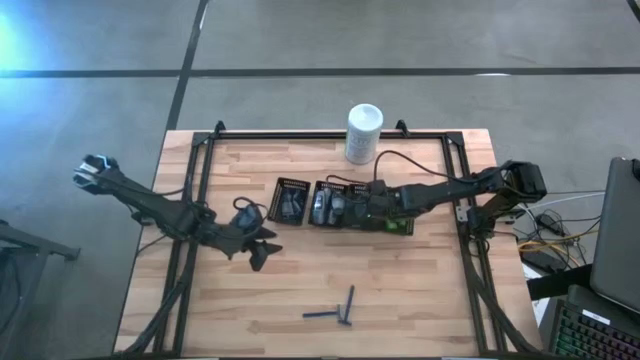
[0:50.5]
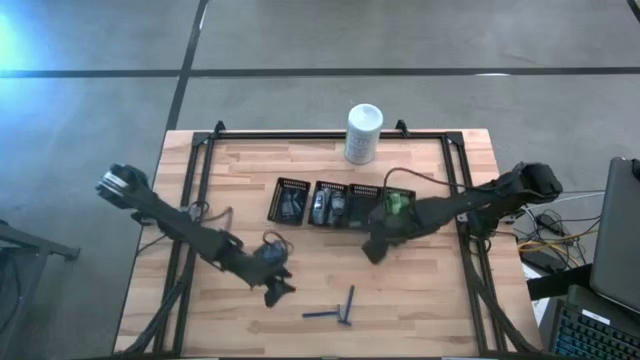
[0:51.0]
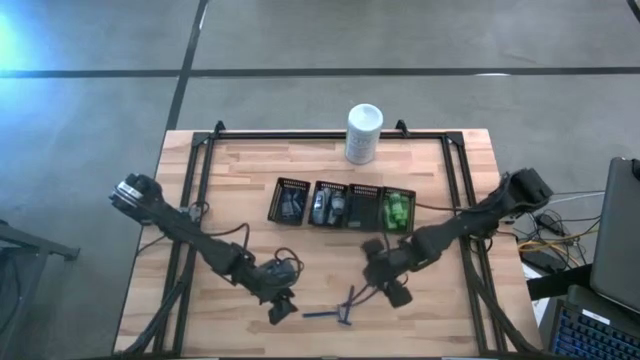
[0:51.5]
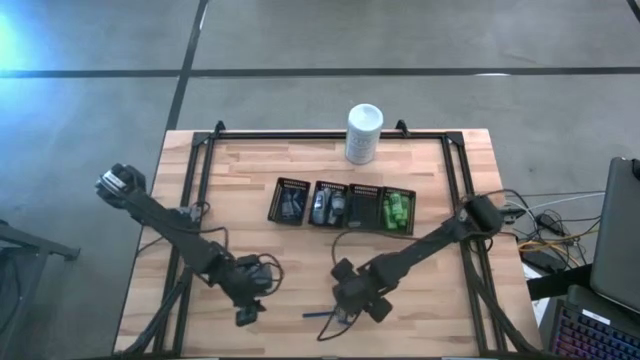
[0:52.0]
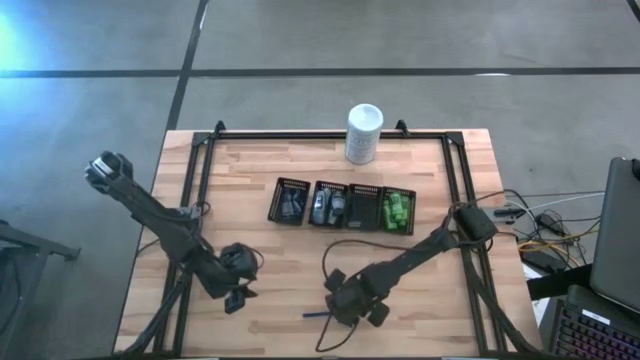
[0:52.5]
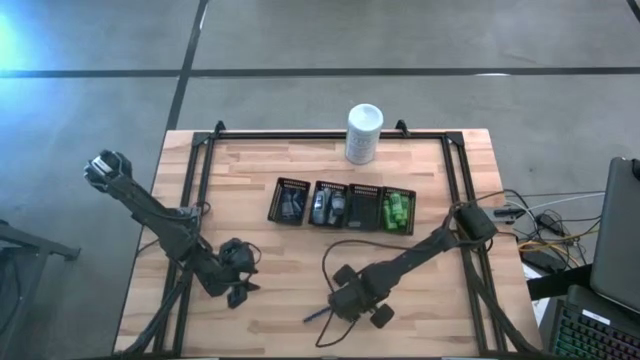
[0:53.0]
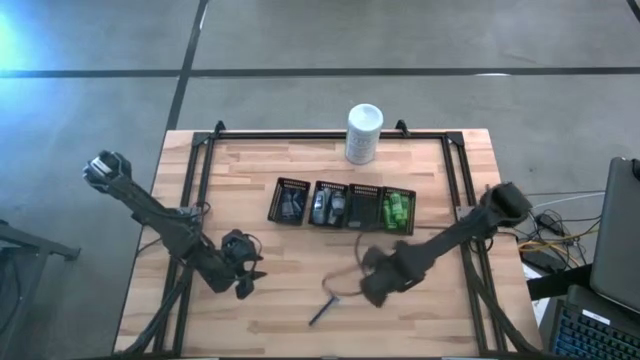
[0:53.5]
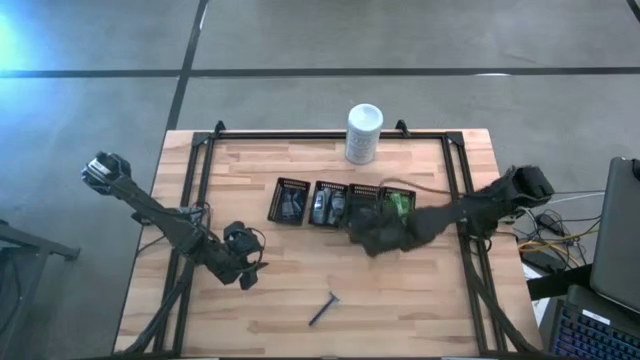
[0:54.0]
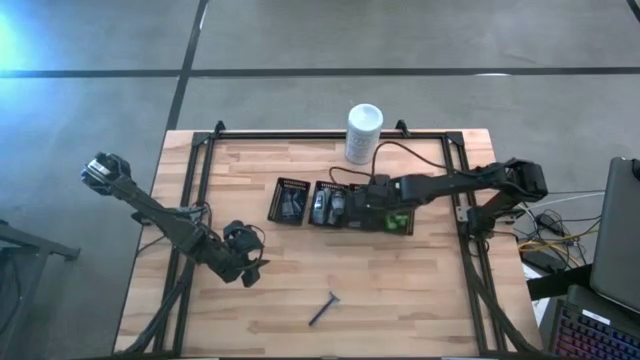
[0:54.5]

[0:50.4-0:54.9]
Task: Pick & Place Travel size toiletries
Put the blue razor into the middle right black bin

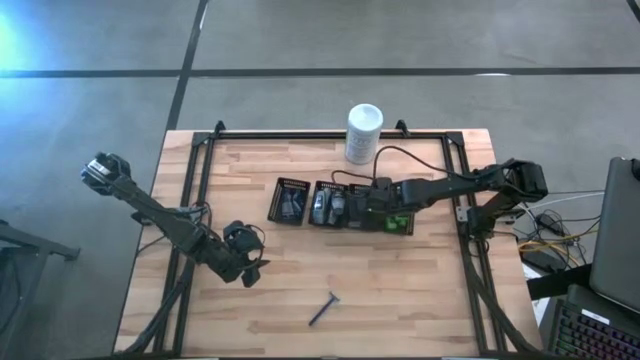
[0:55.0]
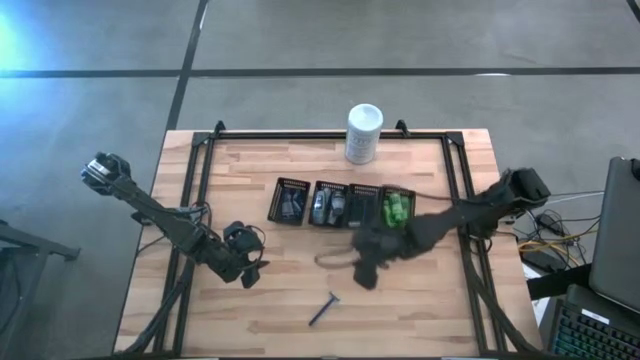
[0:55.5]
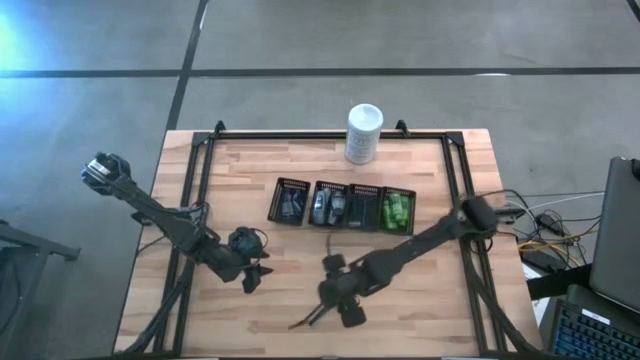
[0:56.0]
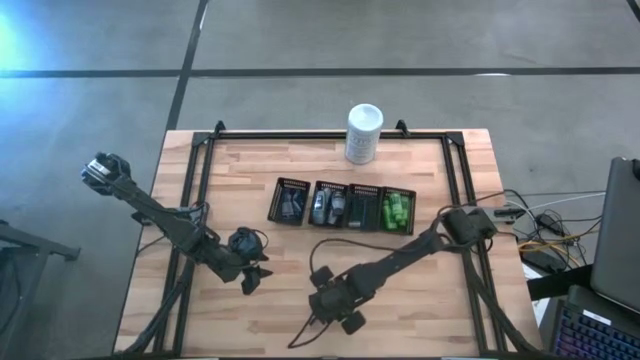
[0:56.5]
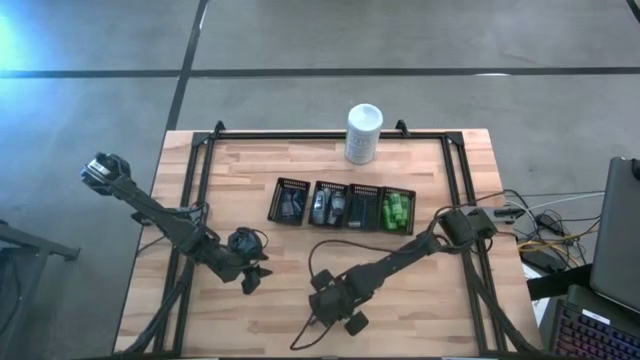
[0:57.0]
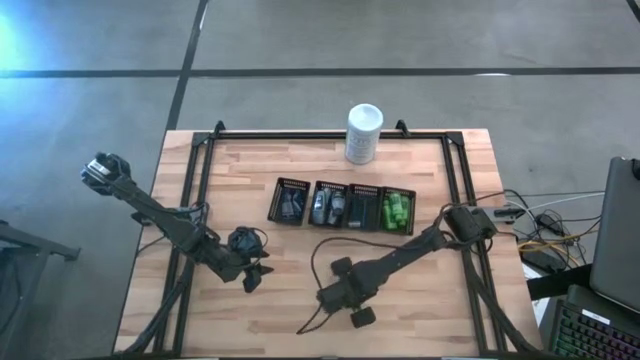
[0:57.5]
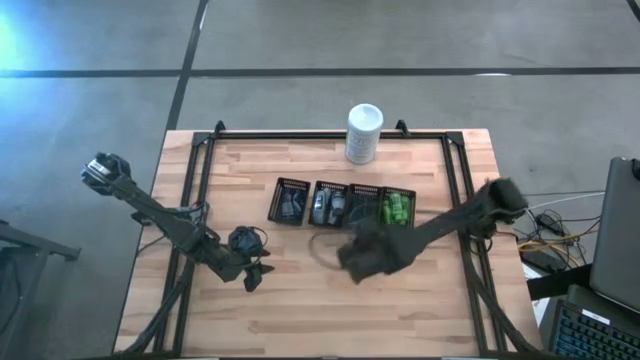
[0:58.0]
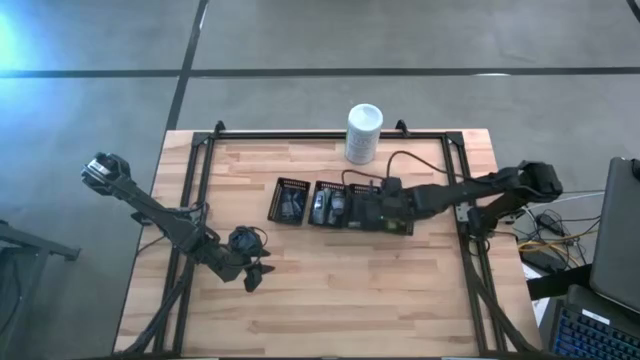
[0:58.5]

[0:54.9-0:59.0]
Put the blue razor into the middle right black bin

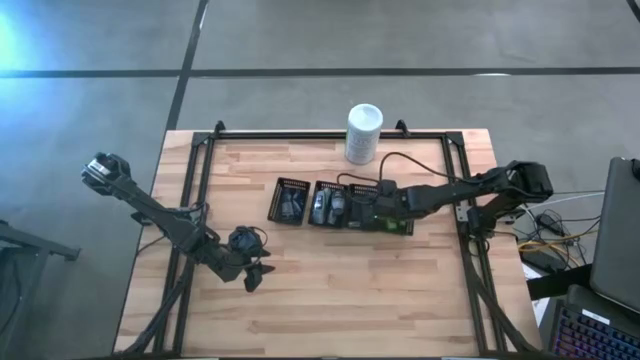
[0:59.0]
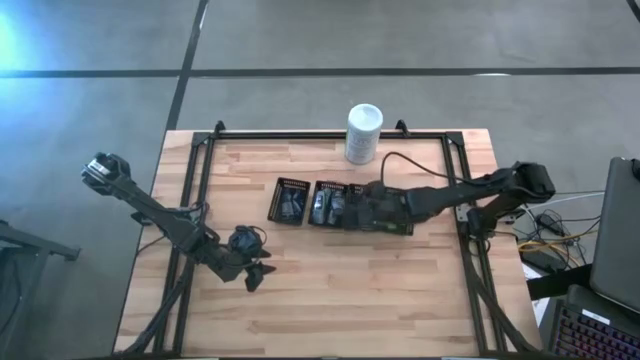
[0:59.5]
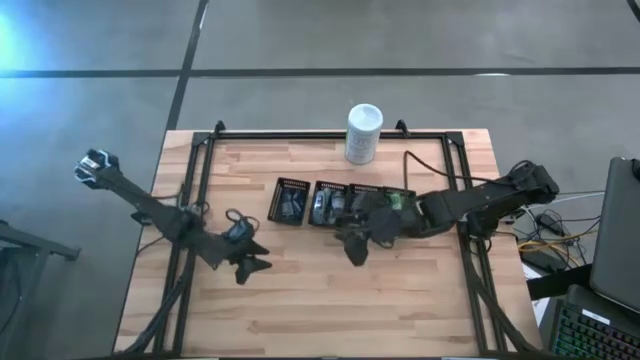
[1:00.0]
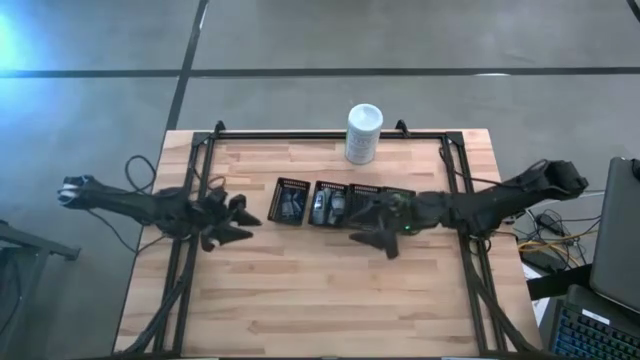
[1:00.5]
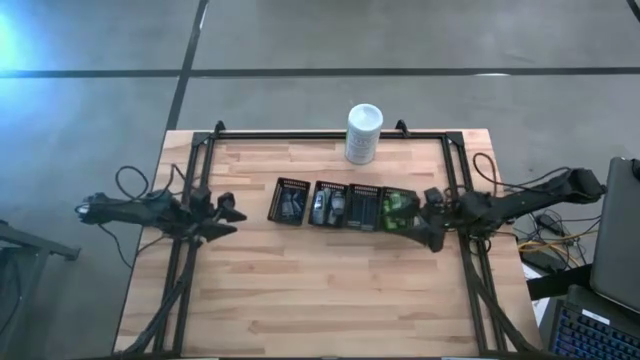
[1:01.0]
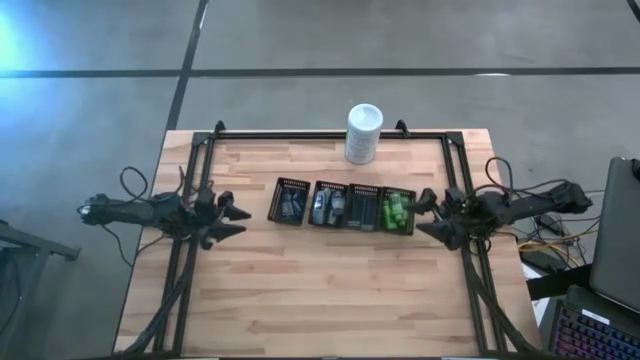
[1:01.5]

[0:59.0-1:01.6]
Return to Home Position

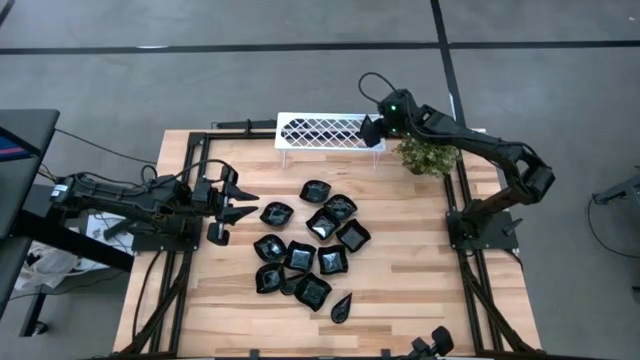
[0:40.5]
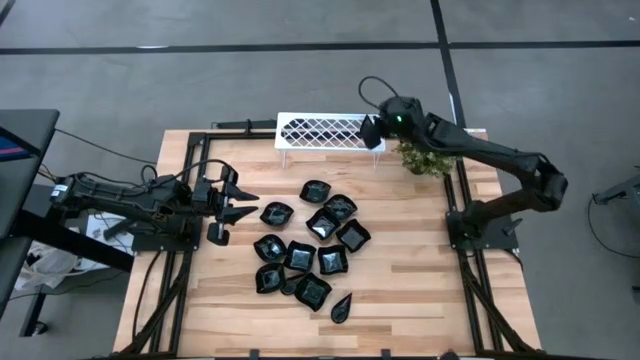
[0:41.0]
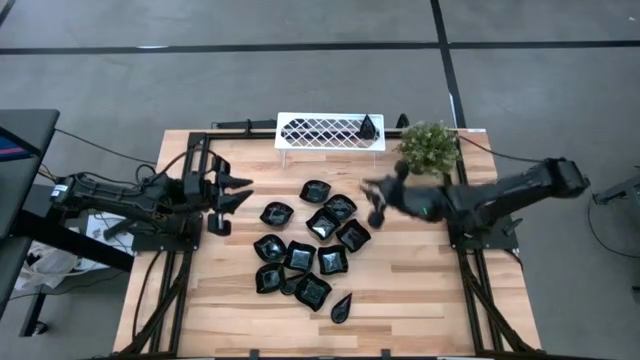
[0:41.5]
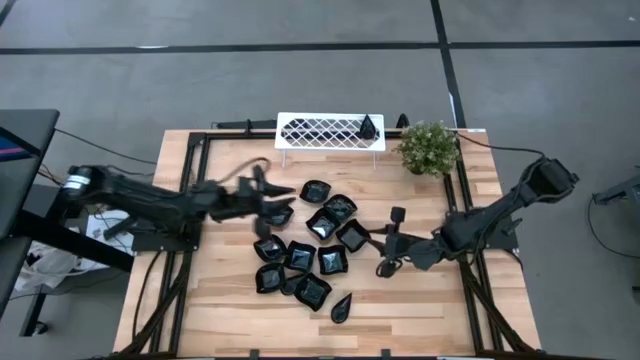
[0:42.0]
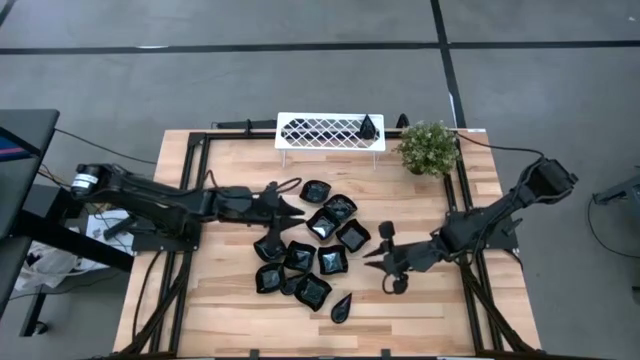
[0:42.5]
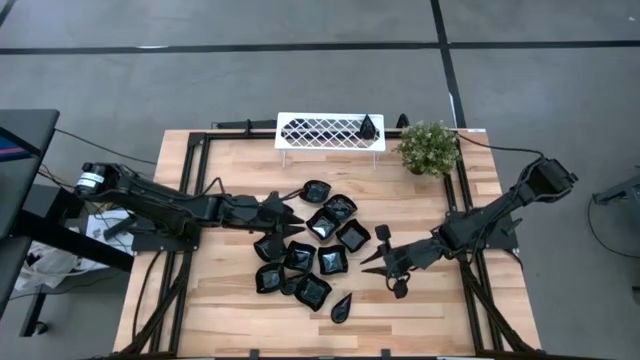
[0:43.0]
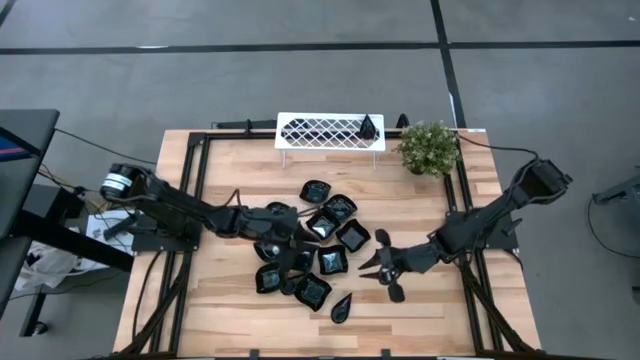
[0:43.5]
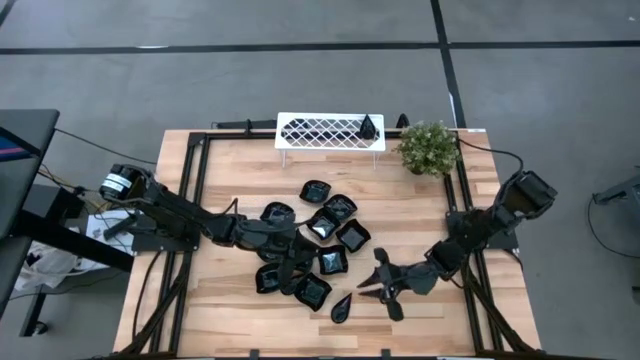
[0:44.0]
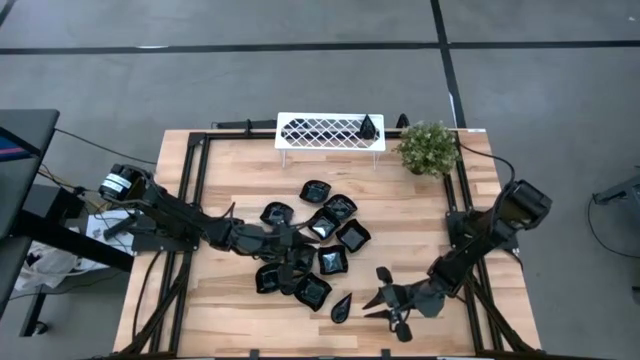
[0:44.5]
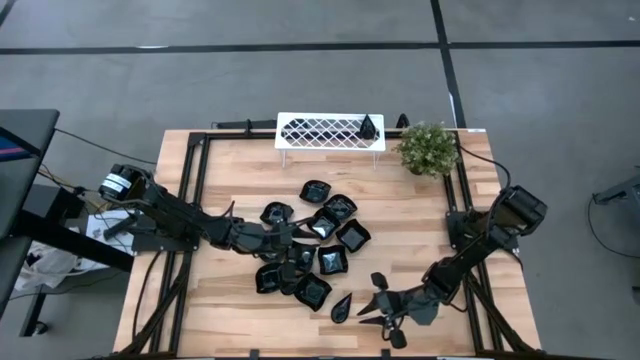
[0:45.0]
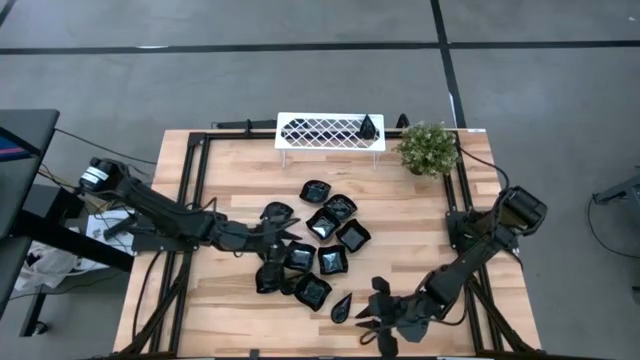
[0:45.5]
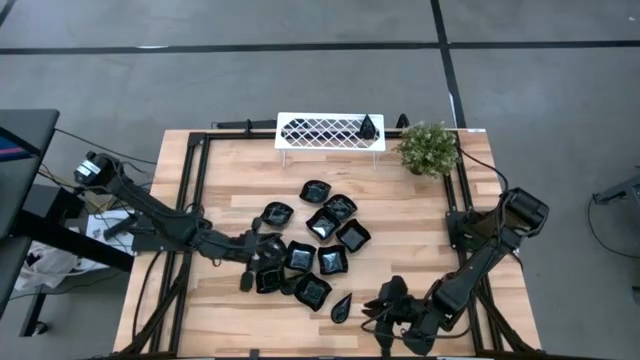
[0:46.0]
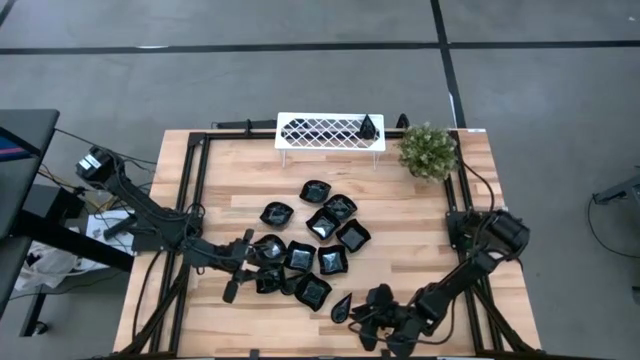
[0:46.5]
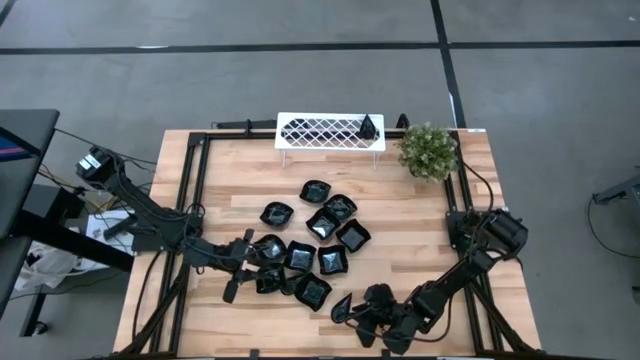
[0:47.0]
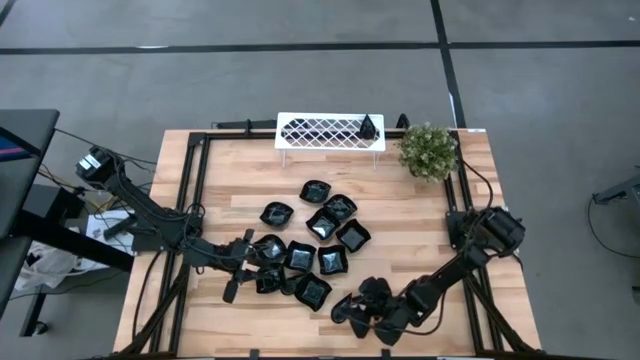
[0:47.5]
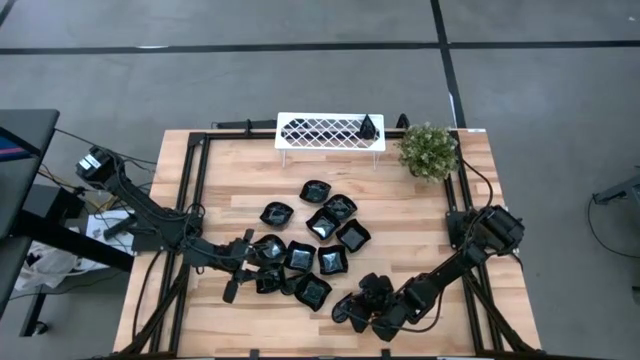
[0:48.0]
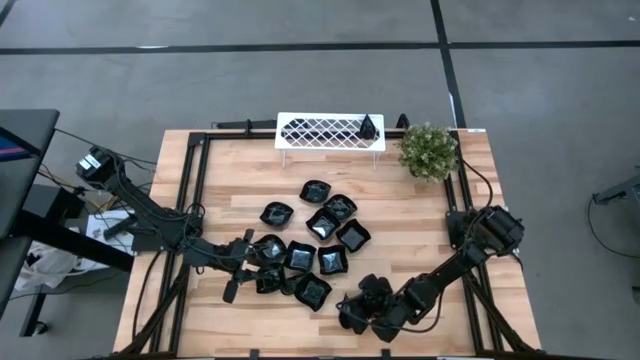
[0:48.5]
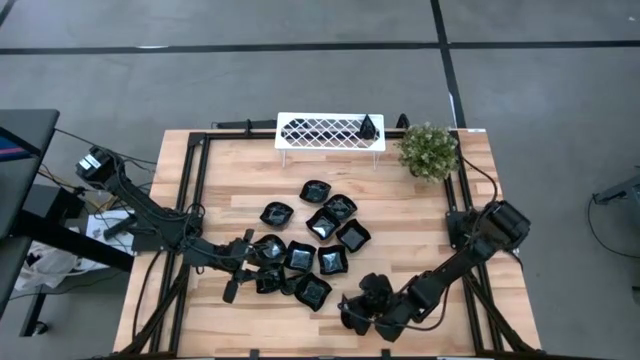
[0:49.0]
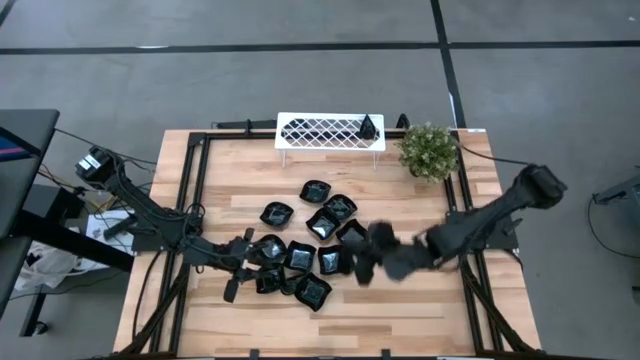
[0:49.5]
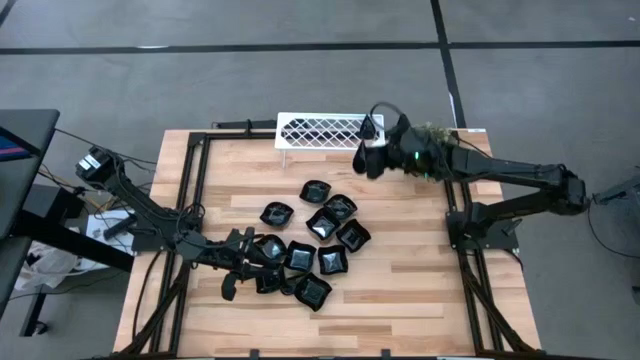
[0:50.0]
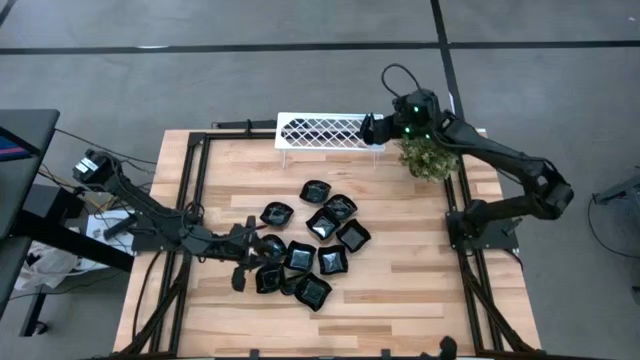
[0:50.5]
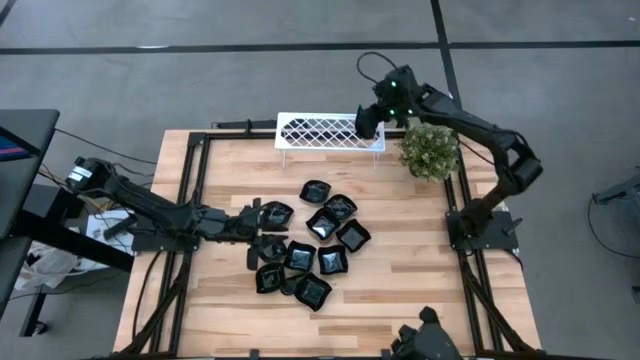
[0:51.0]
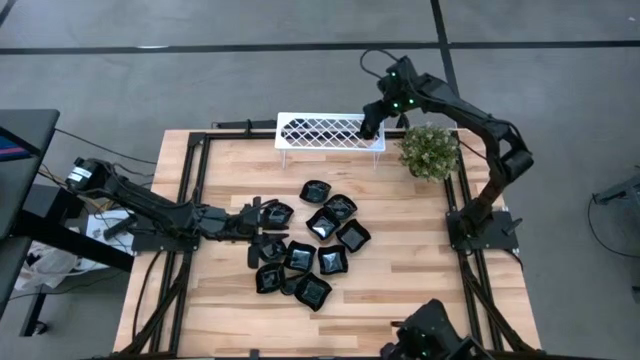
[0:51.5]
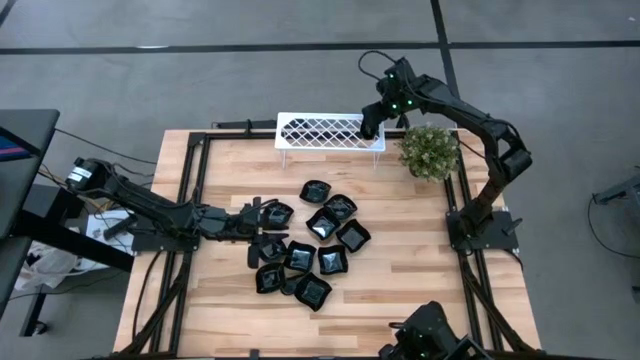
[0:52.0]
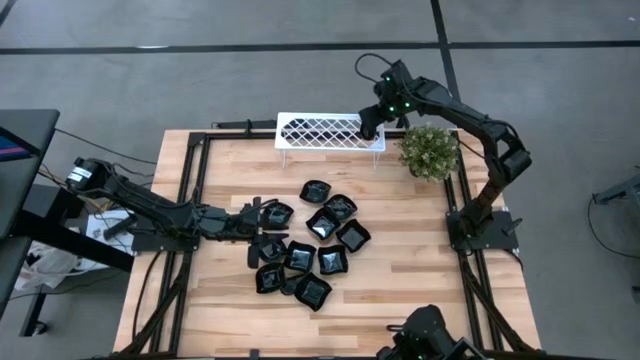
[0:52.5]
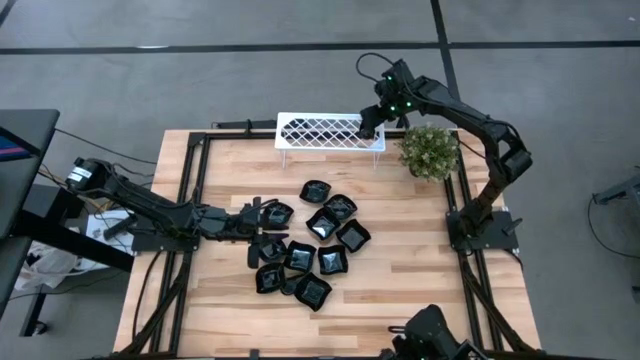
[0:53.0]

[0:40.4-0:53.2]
Task: Pick & Place Mini shaped plates
Stack the right drop-shaped plate on top of the drop-shaped plates on the shelf
